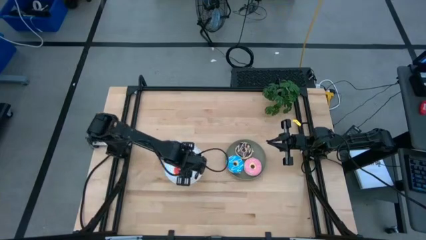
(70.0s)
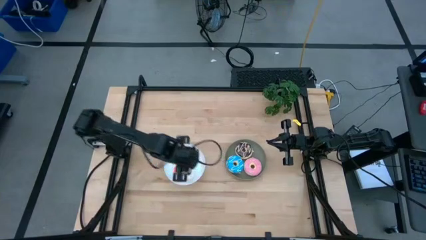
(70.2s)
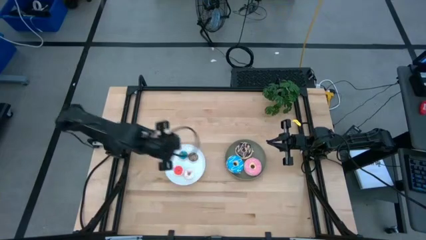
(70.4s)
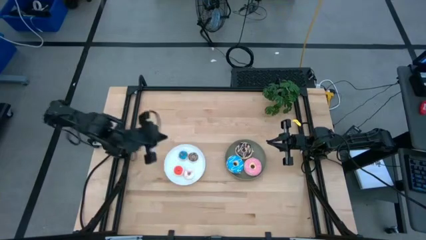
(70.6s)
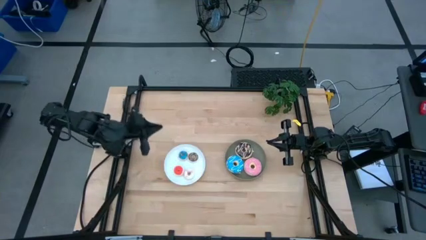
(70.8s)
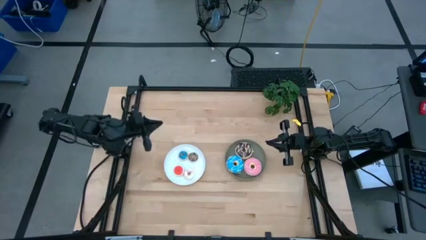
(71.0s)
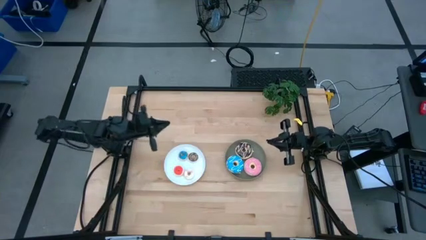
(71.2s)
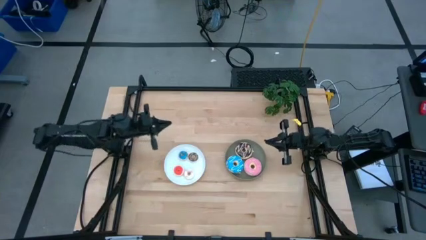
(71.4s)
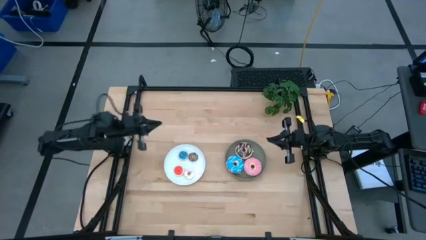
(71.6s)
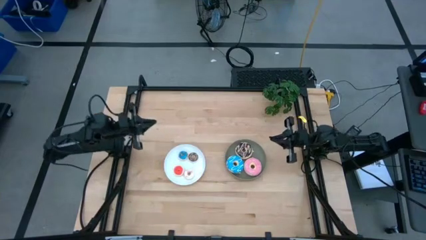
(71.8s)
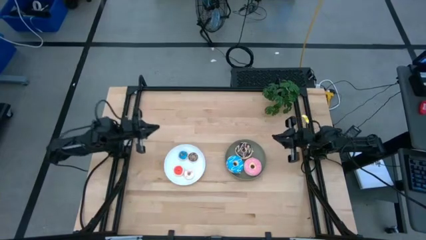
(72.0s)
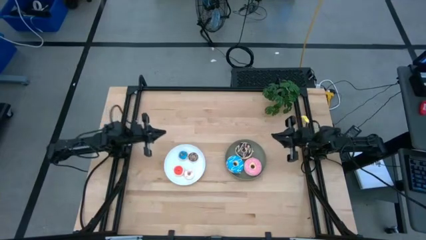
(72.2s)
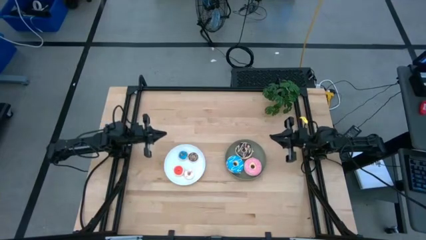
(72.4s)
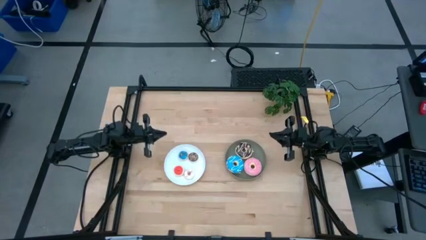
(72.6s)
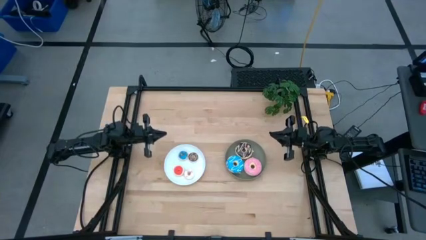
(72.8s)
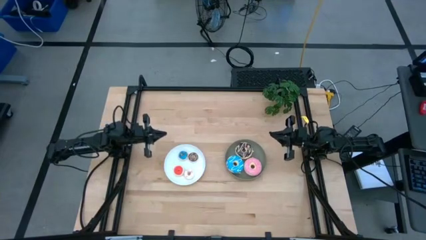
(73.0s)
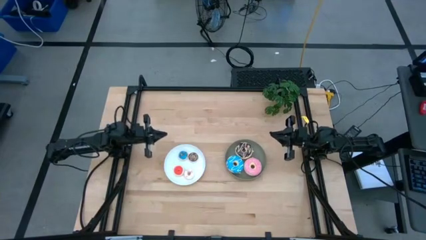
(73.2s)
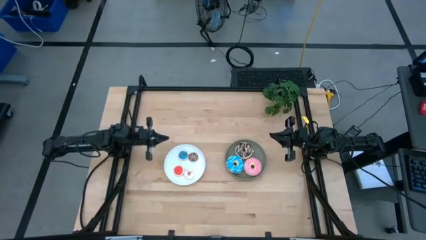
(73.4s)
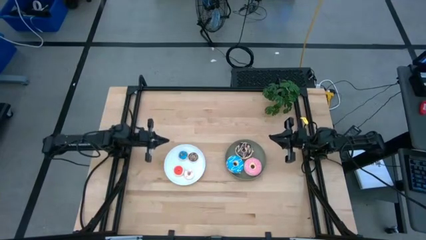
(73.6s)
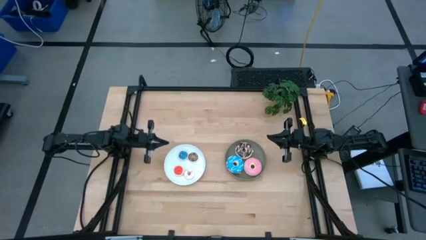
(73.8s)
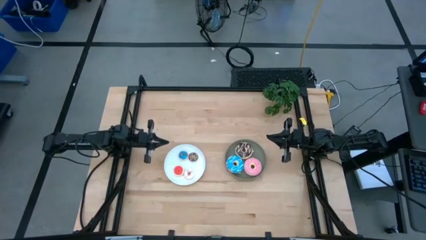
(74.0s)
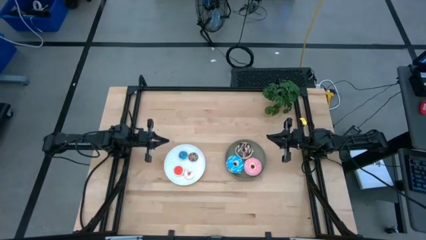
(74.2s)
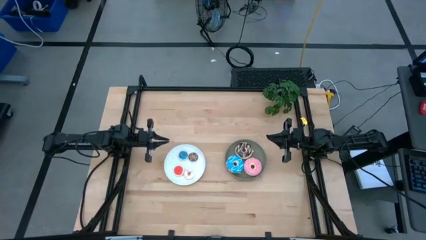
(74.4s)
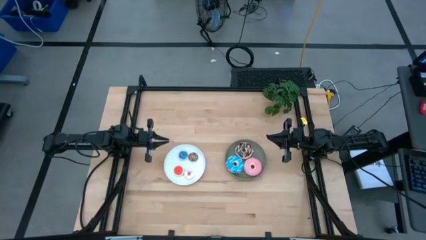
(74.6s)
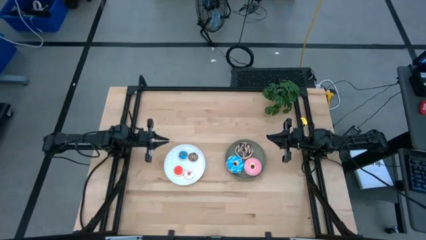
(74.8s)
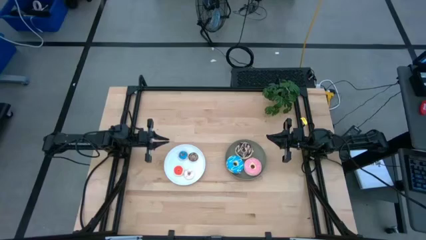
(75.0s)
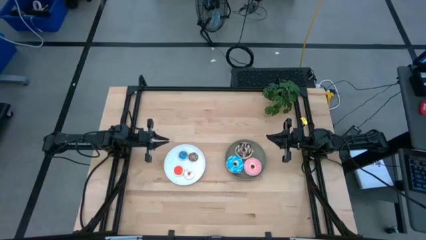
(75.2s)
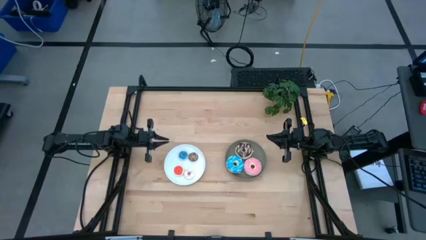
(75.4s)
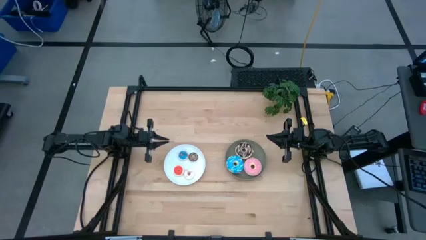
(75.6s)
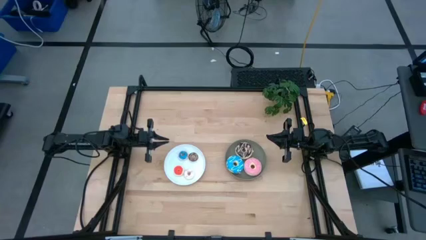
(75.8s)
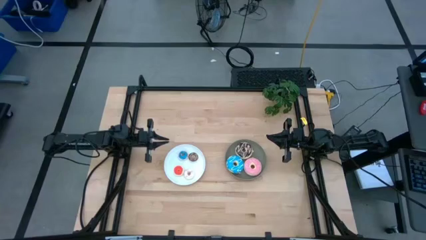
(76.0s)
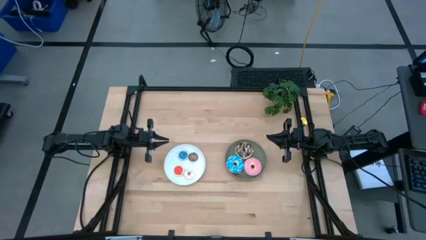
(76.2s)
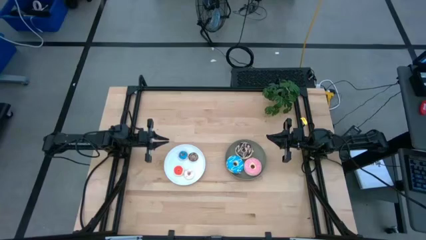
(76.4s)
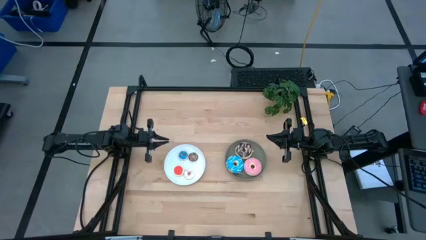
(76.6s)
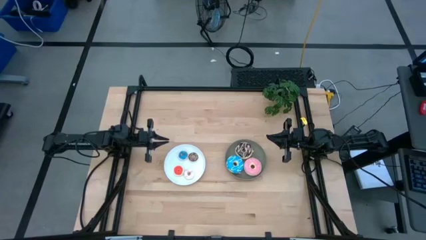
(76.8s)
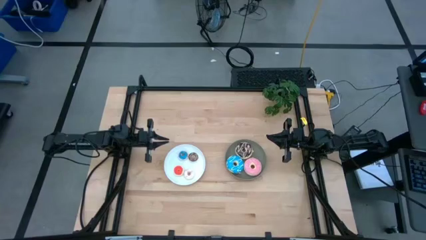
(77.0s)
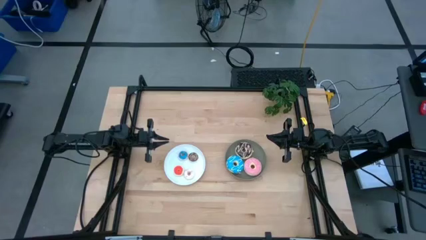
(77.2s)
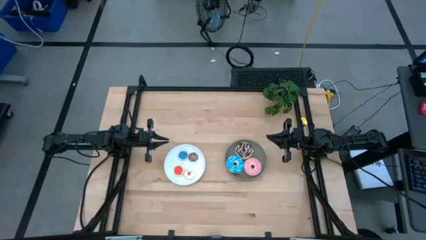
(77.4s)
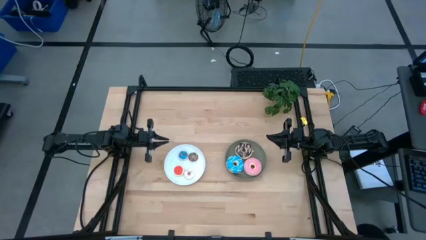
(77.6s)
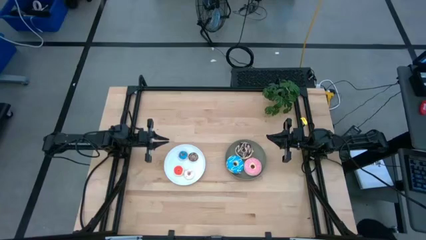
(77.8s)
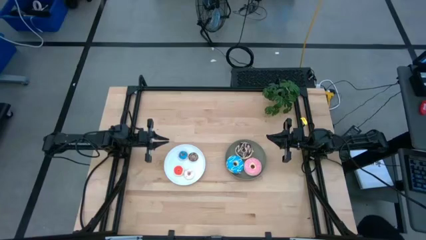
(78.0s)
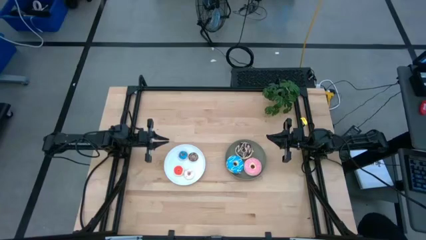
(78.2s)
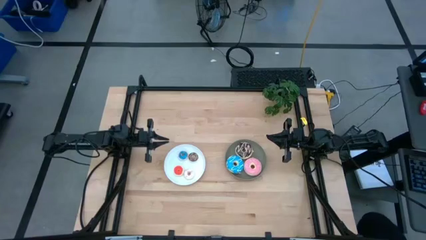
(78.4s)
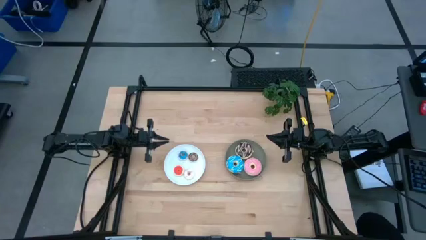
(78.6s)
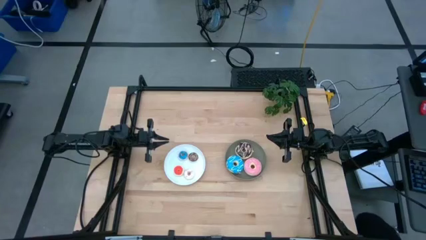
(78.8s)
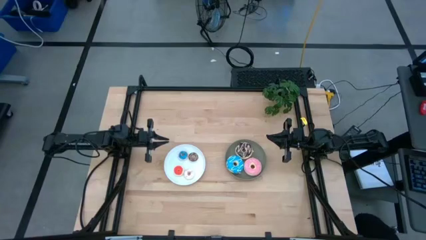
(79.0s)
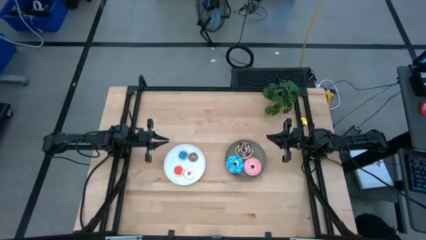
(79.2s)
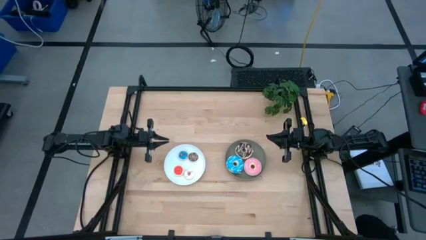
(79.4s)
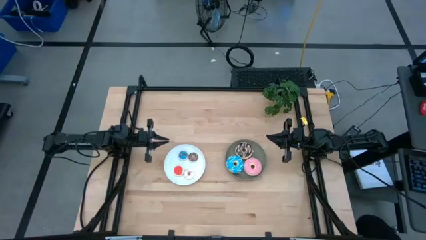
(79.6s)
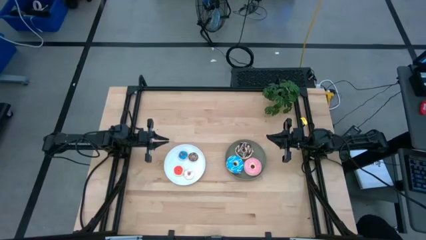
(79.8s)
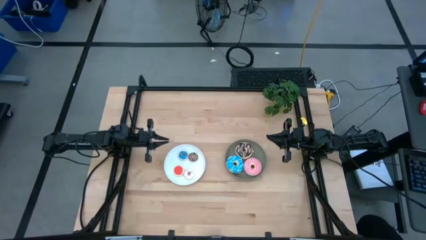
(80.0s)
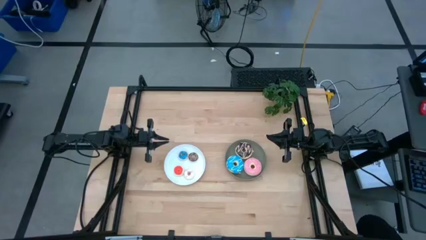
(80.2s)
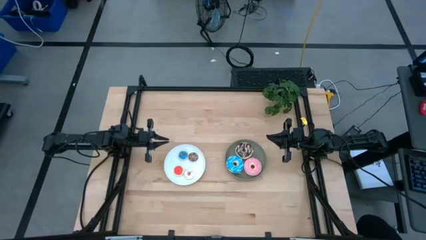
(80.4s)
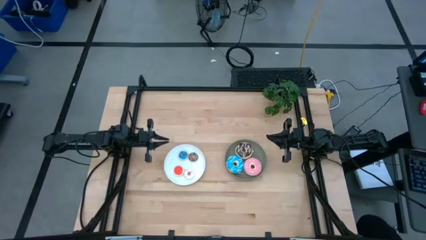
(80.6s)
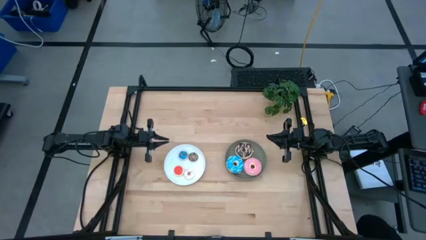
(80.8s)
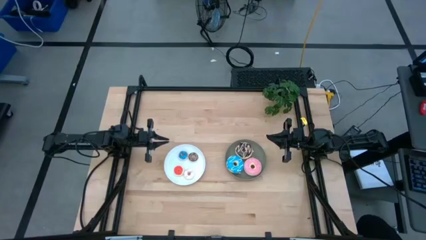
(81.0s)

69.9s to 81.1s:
Task: Pick & Place donuts
Return to Home Position
